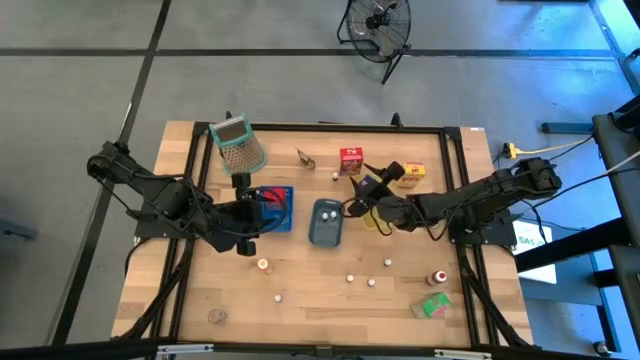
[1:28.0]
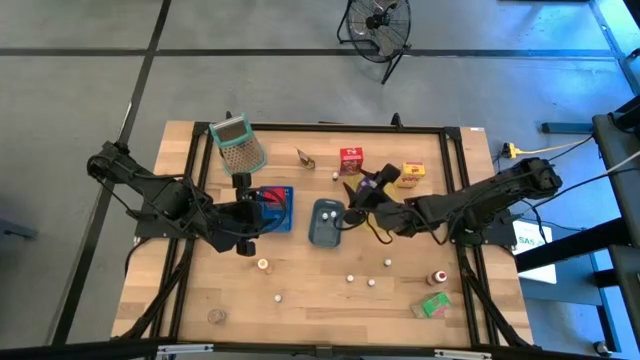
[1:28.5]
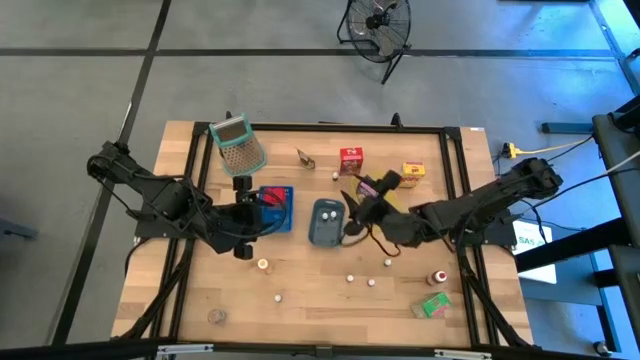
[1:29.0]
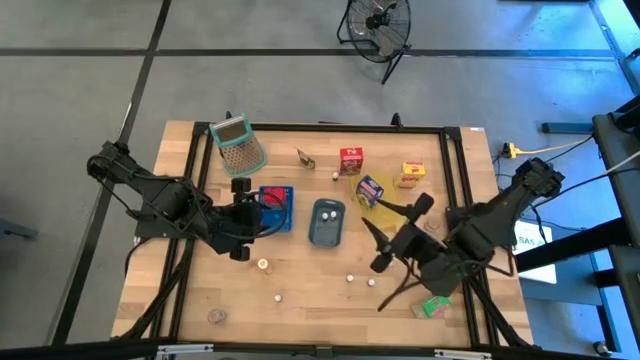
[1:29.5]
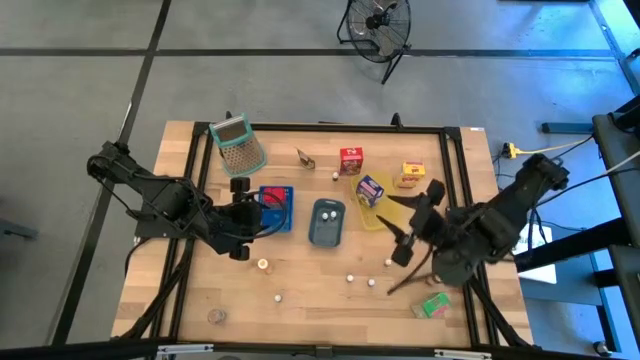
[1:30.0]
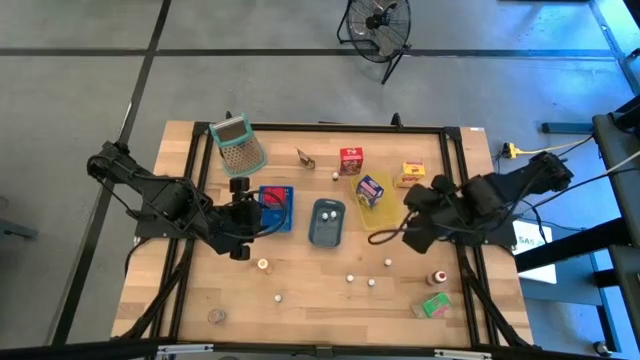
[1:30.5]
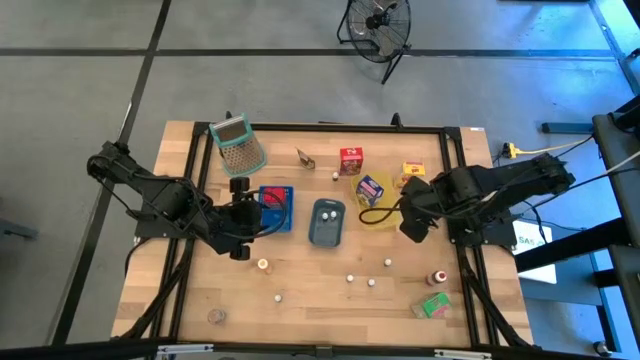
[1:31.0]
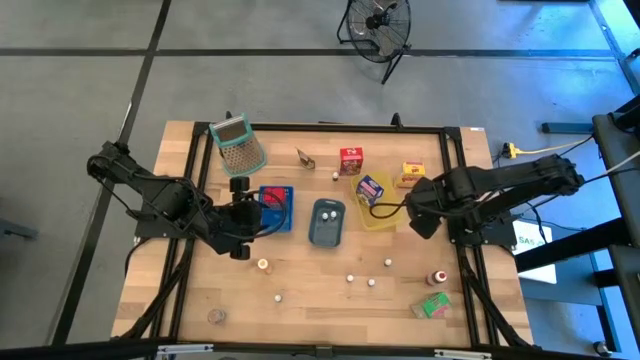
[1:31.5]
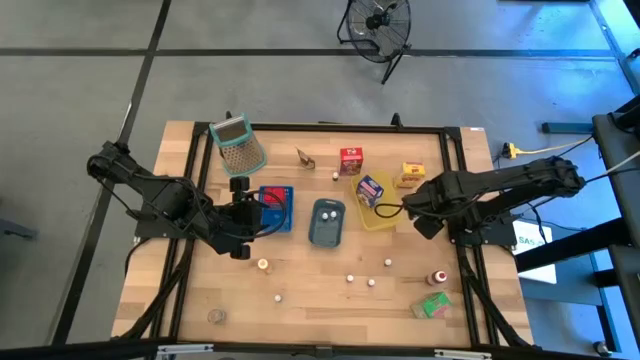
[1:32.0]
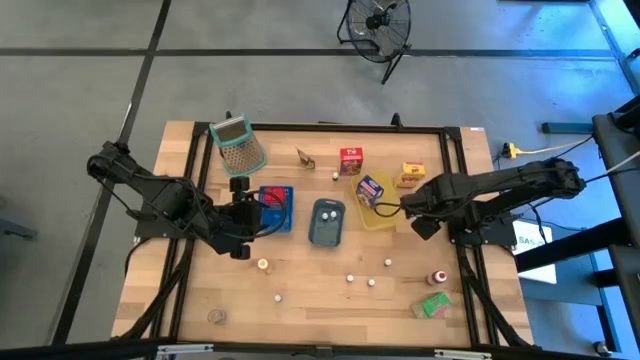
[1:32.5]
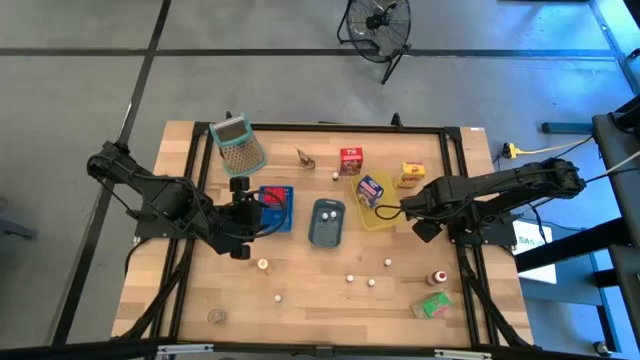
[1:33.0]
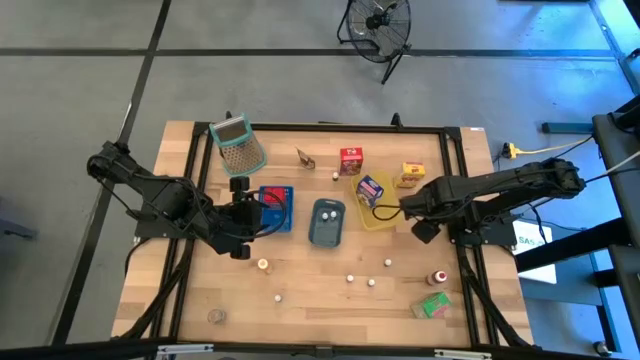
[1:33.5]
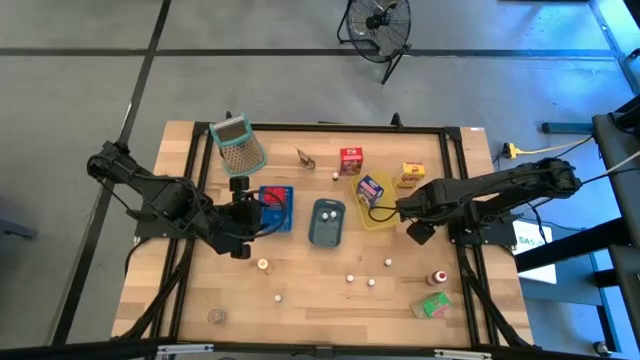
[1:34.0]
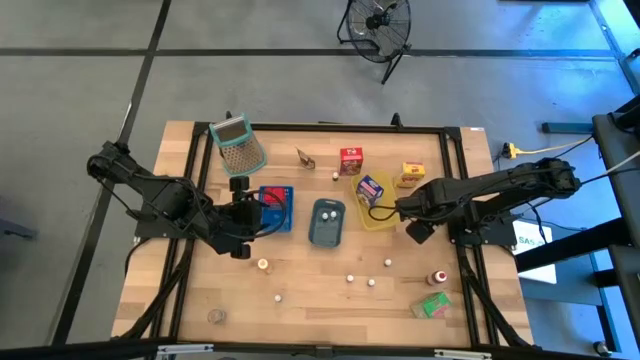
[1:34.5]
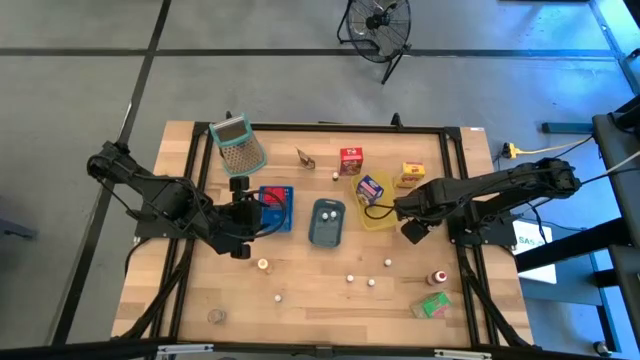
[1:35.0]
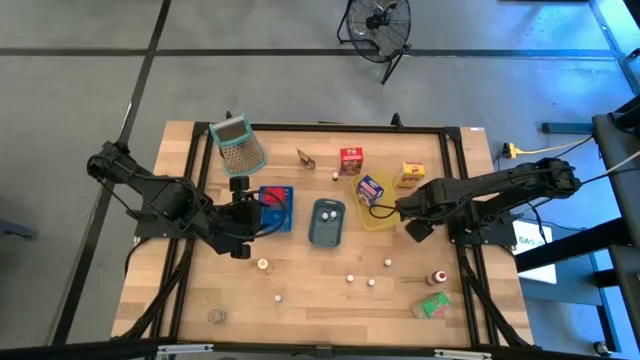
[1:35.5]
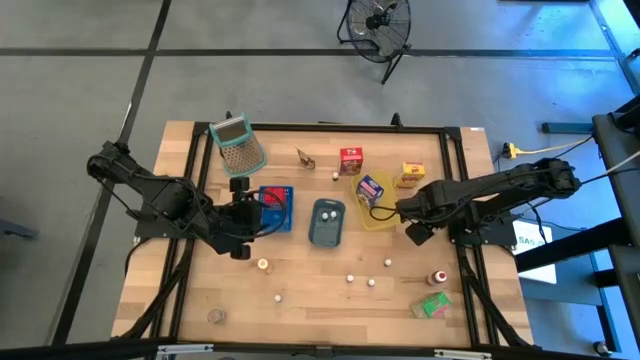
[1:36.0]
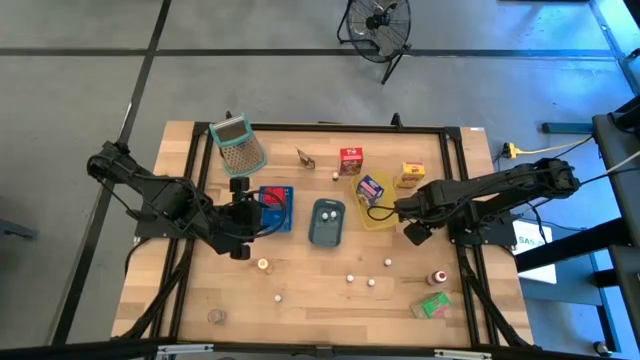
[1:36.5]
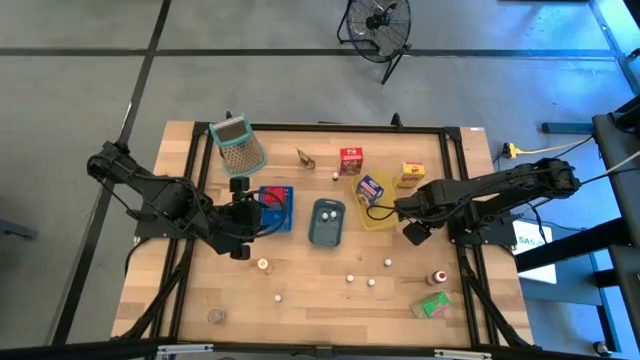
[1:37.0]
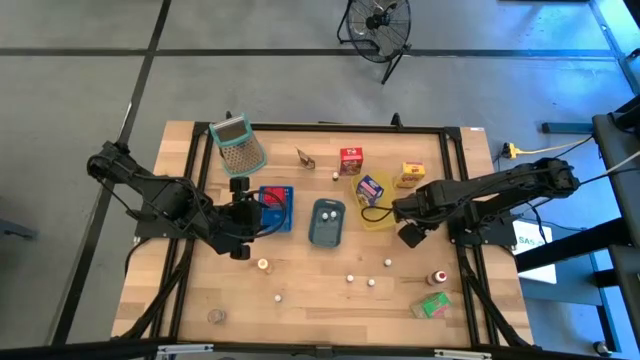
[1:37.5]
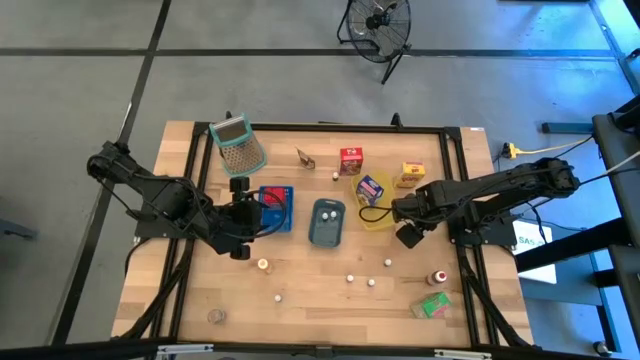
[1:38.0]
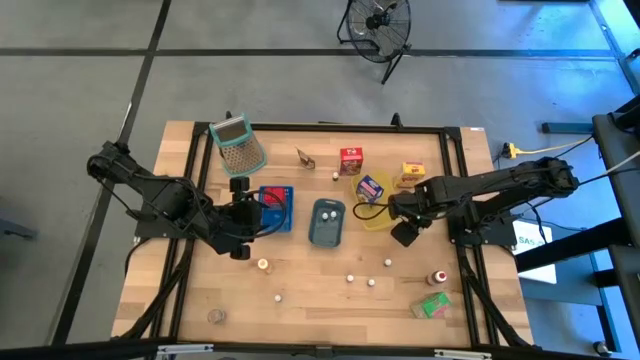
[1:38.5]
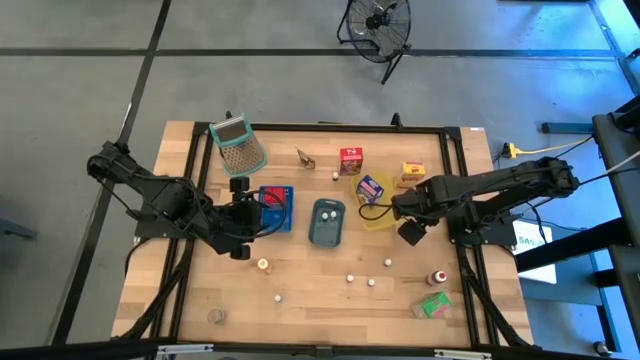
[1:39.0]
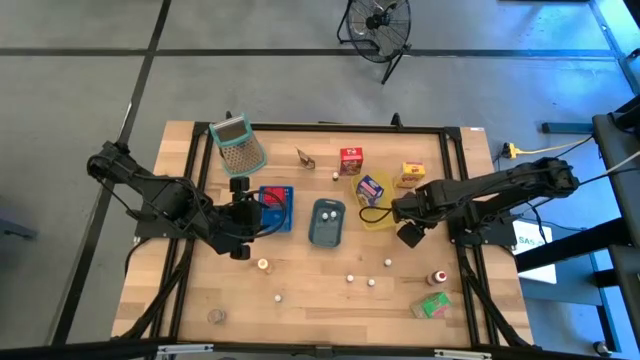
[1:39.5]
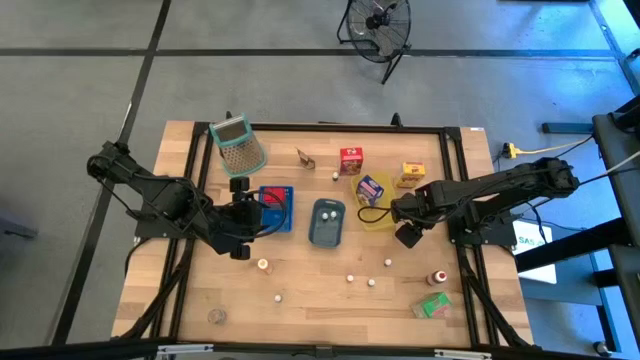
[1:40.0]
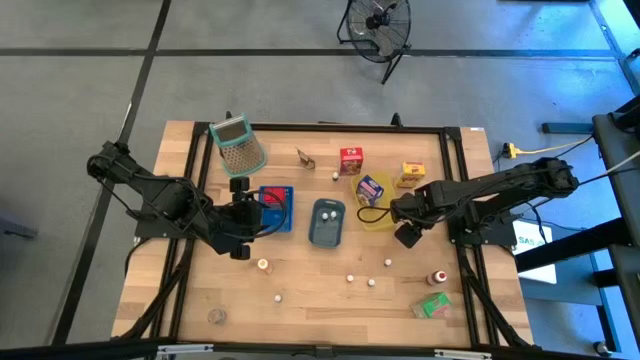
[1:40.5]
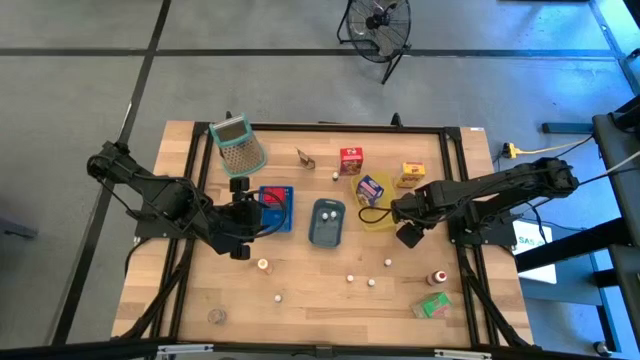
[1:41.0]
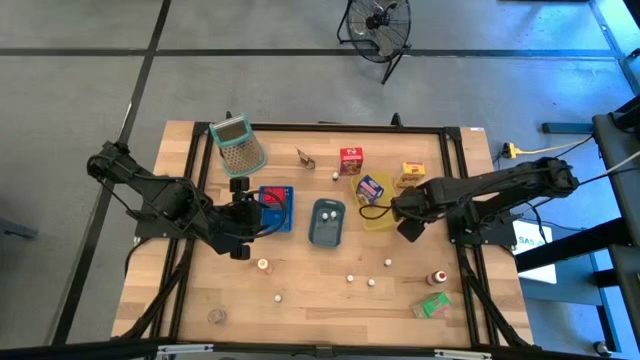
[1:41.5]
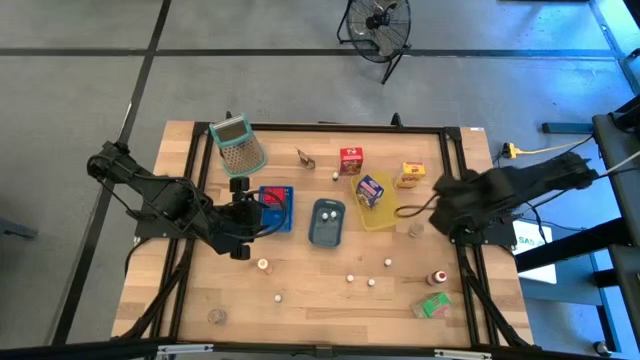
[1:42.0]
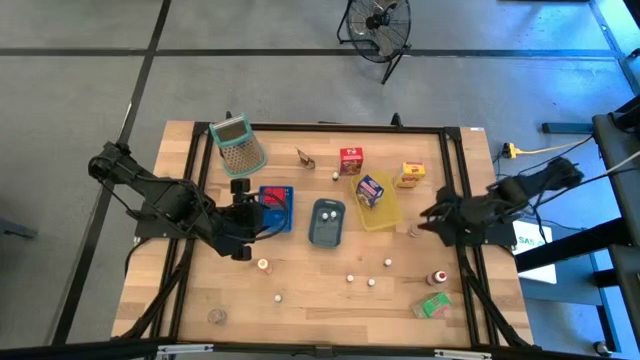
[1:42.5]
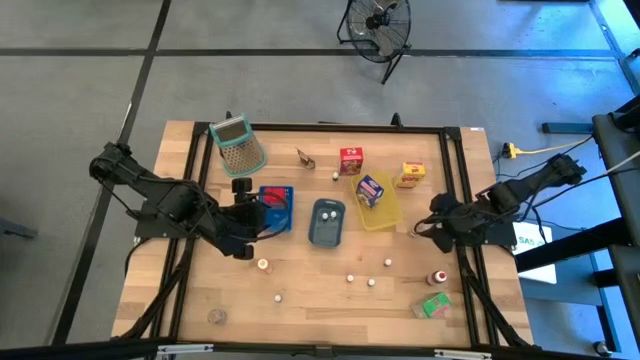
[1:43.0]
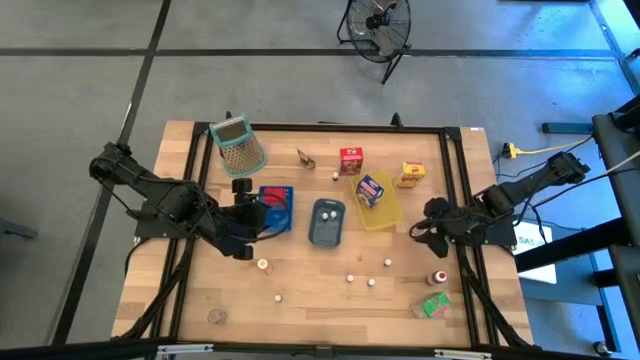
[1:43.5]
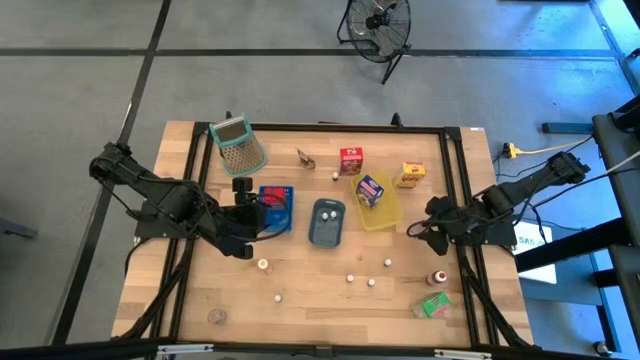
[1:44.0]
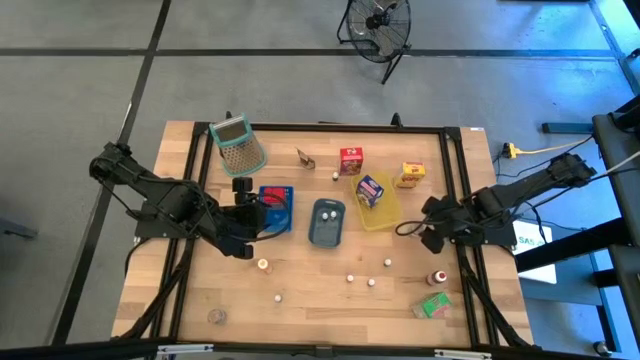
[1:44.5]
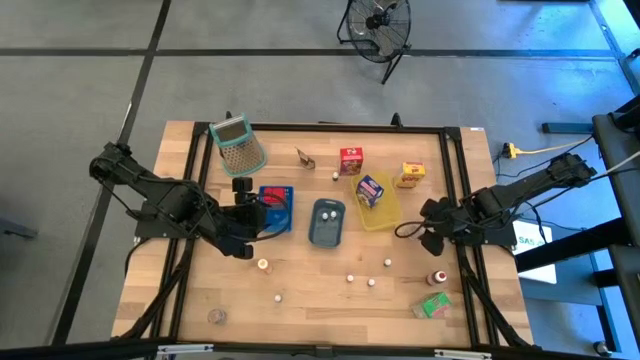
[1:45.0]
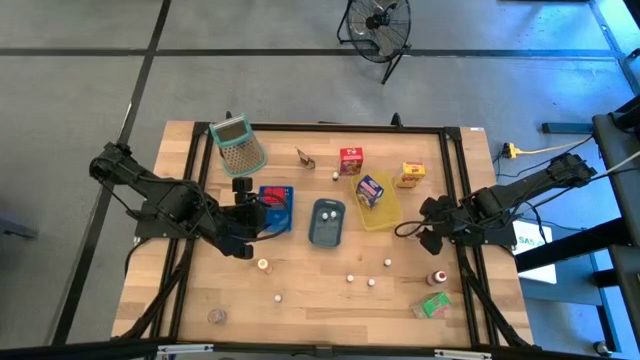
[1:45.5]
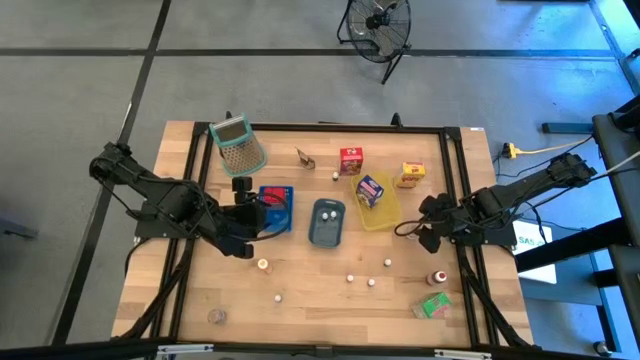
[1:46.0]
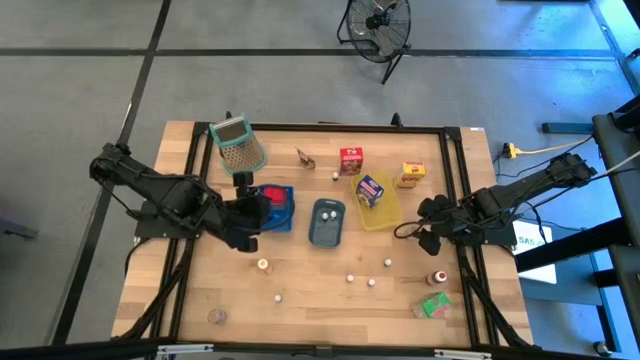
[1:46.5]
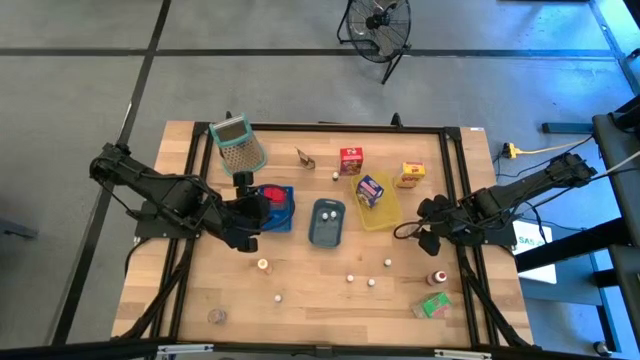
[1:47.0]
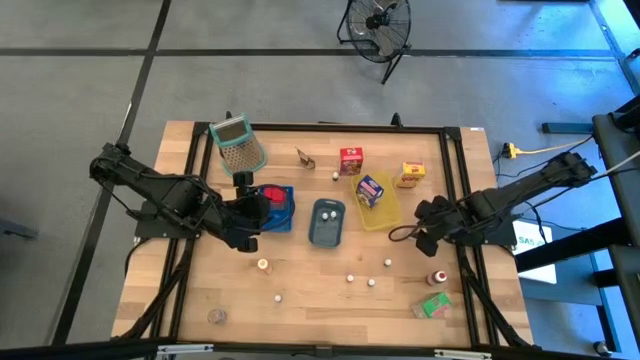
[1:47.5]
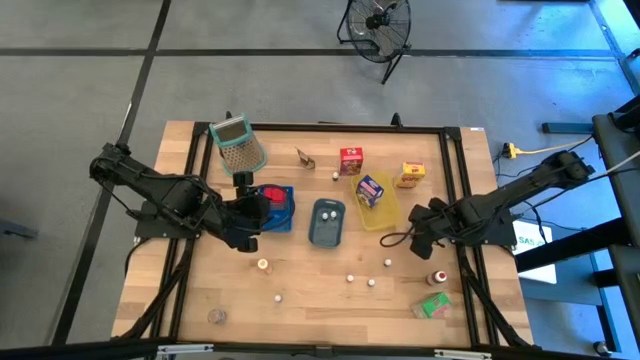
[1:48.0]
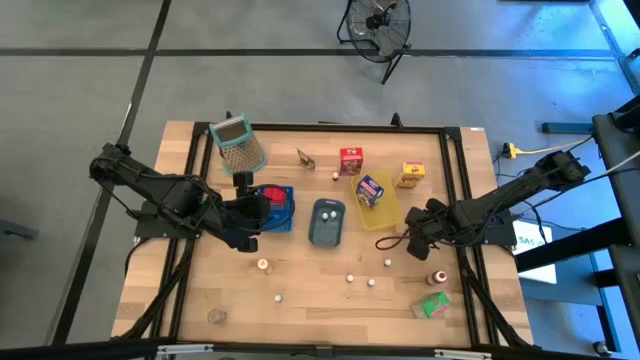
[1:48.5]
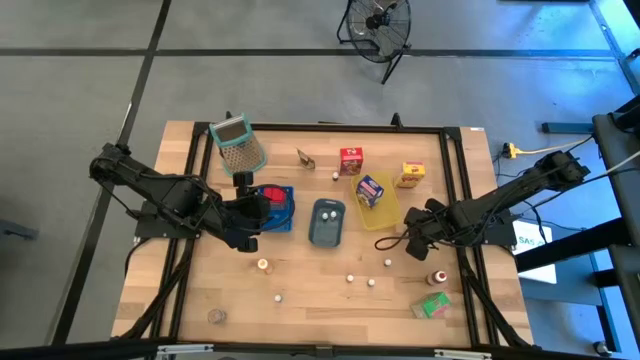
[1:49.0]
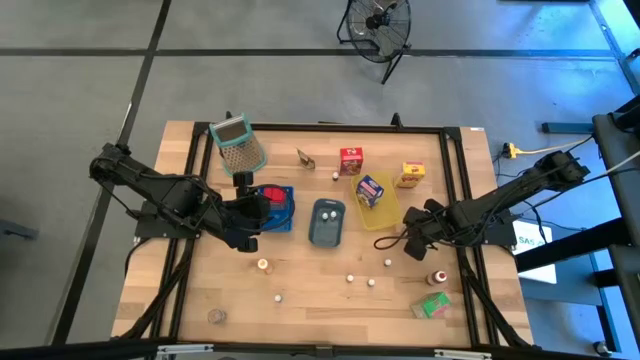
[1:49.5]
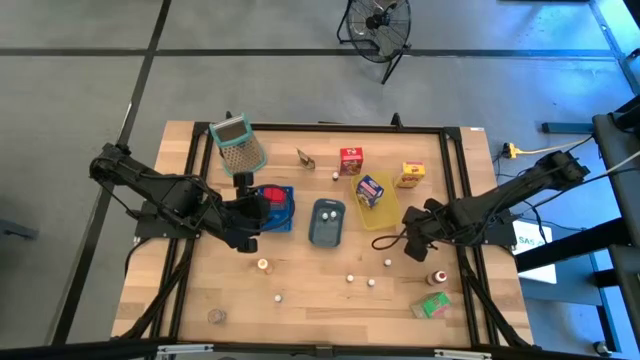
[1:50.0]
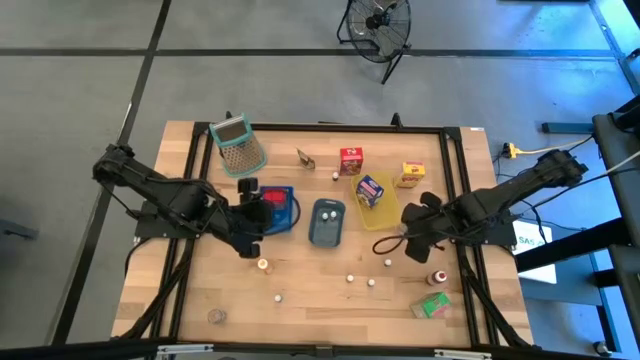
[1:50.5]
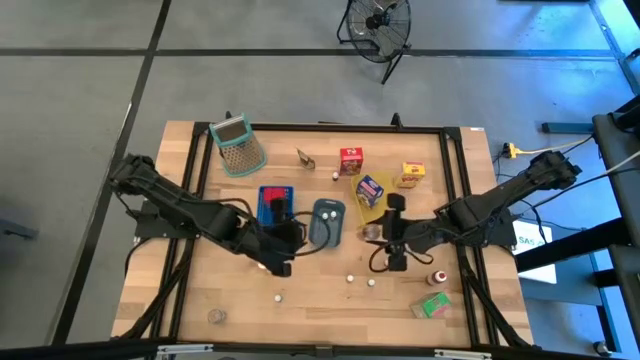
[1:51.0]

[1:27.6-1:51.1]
Task: Pick & Place Kitchen Items
Put the right brown seasoning bottle into the blue bin
